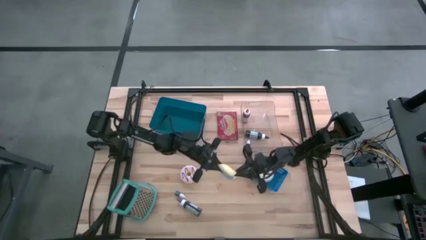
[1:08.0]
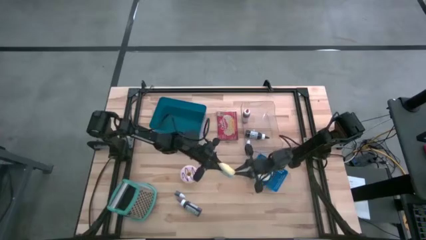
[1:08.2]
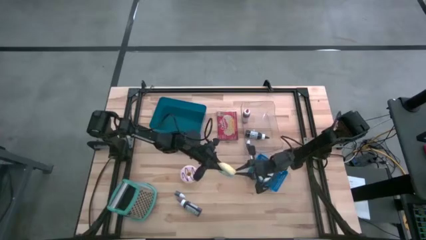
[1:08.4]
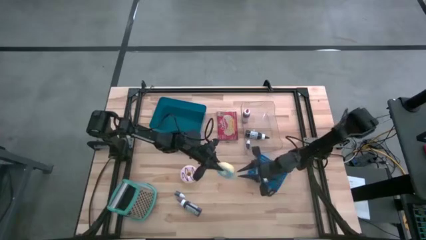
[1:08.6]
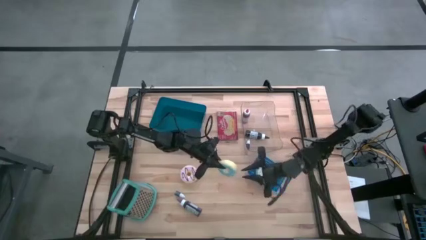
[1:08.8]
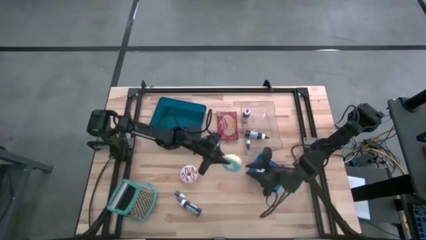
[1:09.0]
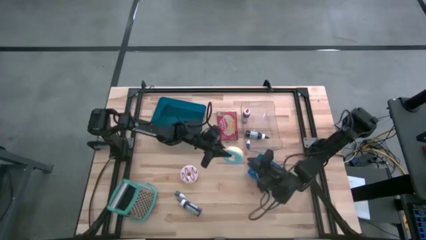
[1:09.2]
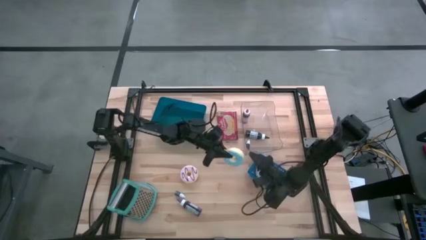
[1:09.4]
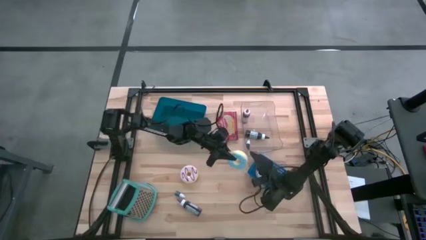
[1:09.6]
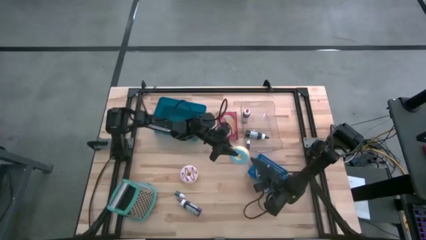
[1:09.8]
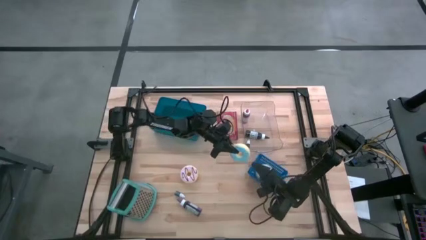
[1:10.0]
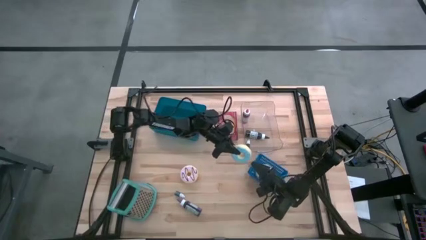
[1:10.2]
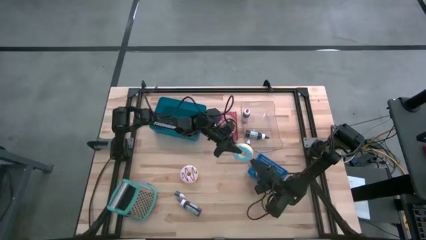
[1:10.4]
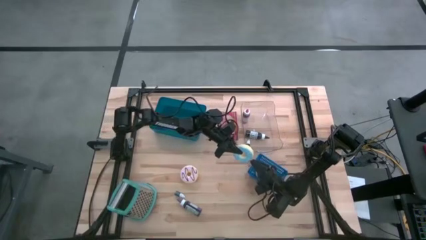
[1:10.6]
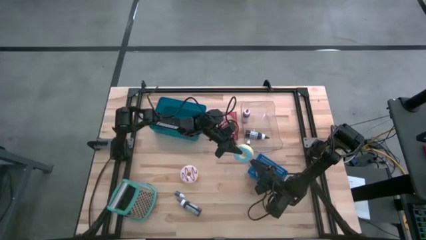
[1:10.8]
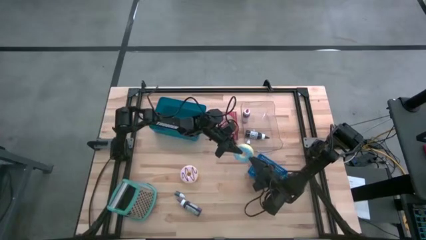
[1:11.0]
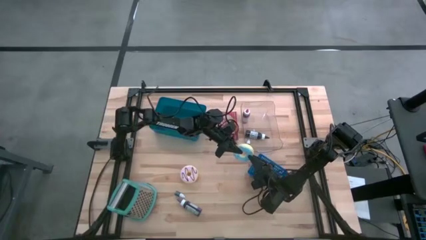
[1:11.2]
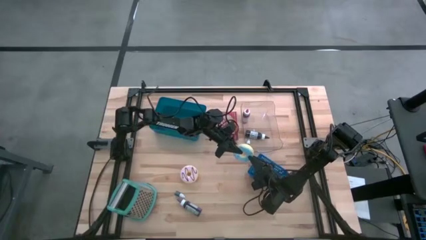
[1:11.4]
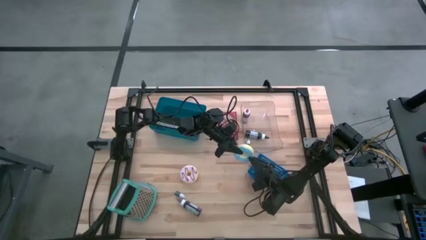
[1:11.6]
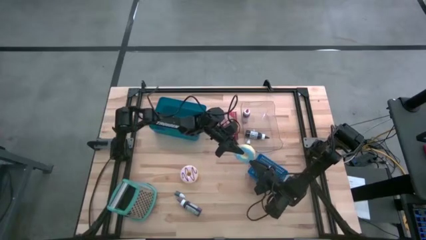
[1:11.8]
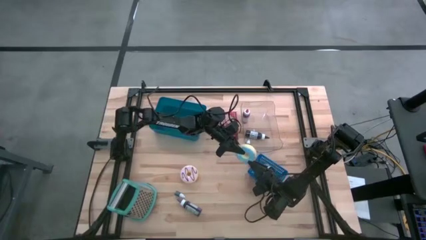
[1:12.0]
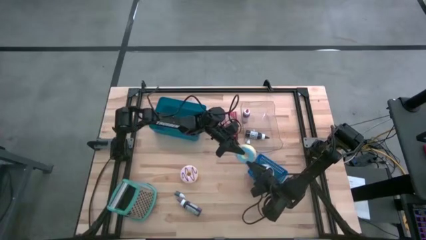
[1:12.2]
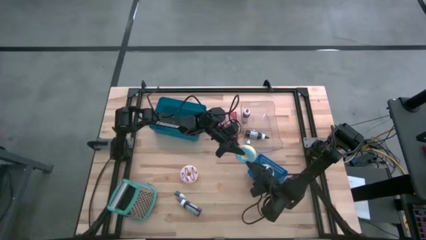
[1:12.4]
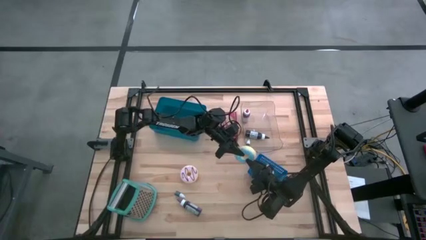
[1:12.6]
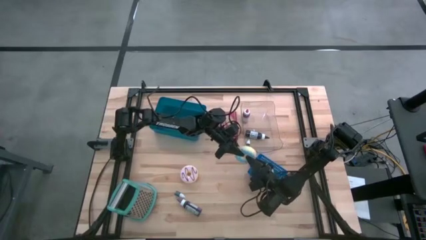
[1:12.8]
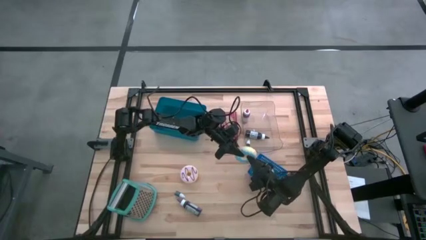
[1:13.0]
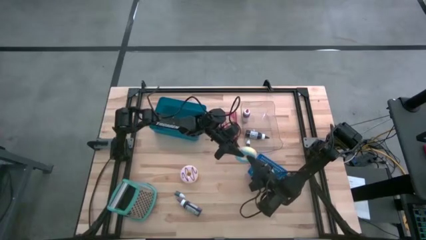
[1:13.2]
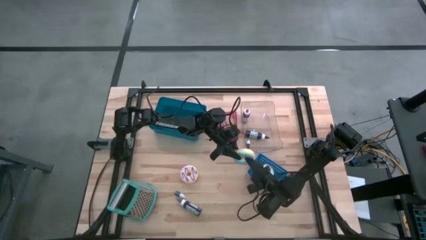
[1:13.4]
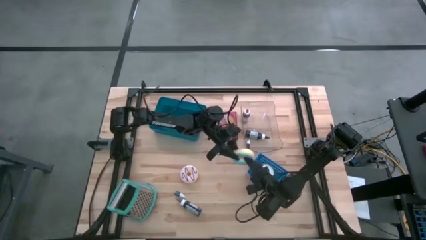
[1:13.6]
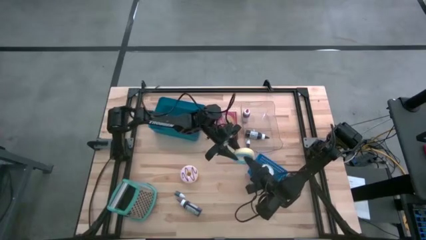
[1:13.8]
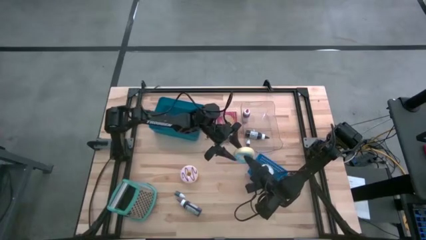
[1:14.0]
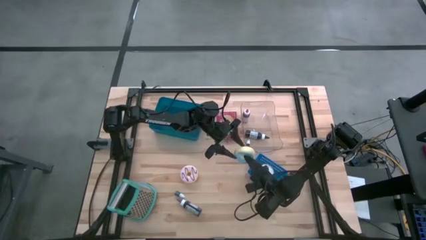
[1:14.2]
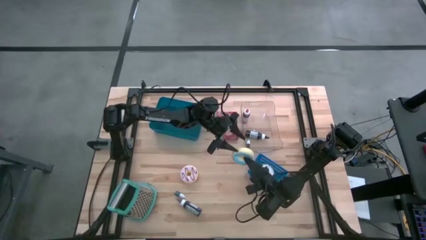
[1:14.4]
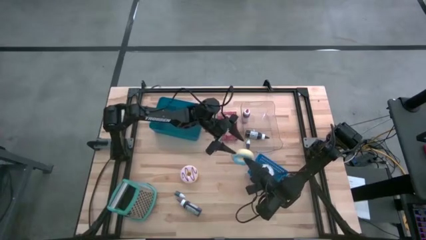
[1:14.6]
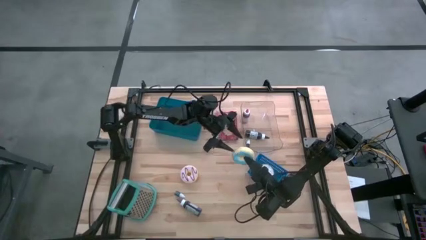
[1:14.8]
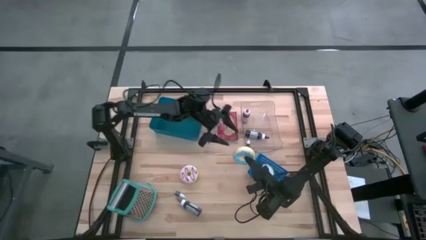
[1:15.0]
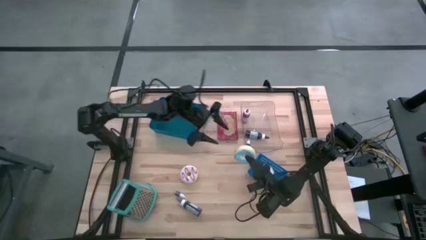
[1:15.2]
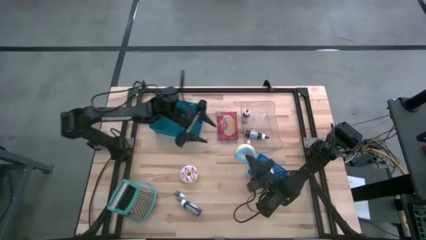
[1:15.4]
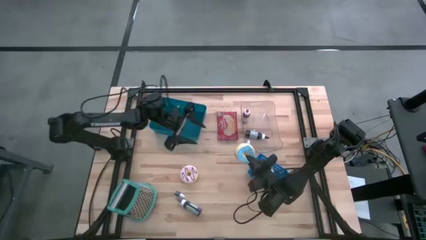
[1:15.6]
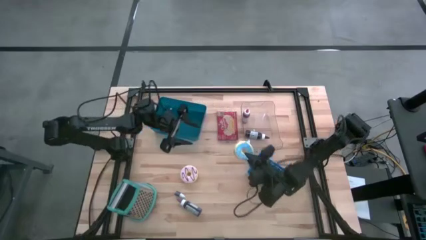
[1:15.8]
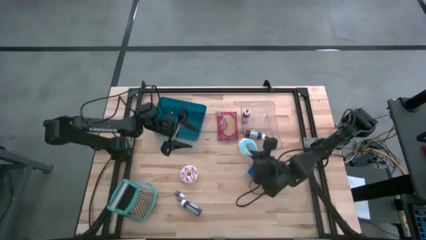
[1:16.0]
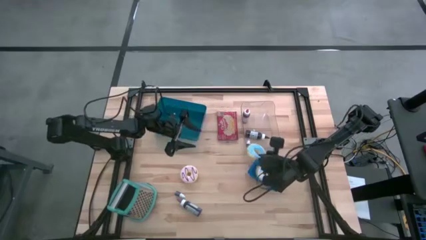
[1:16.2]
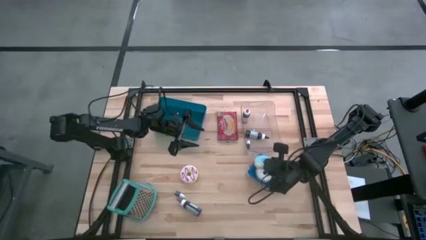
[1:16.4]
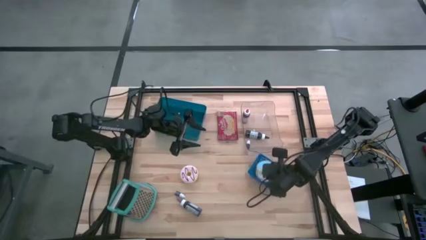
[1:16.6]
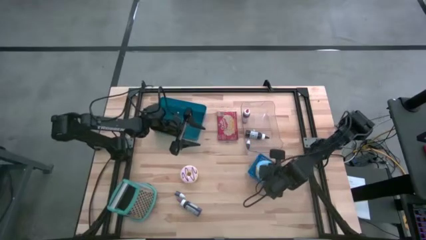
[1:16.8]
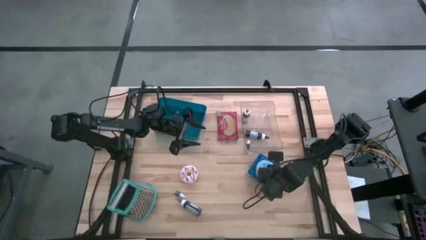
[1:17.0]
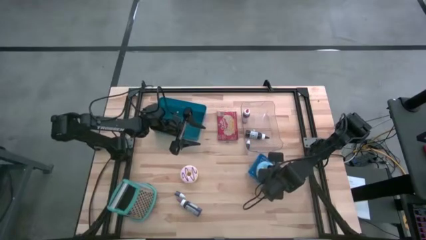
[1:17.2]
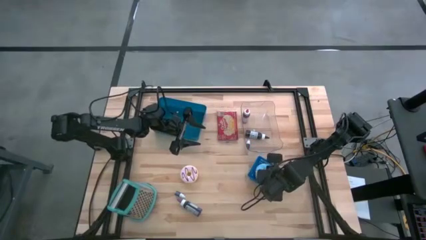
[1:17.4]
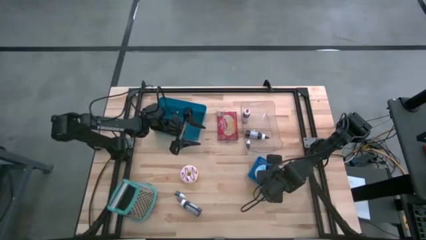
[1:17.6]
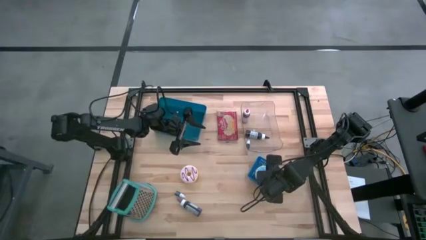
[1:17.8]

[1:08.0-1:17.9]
Task: Pick & Place Food Item
Put the orange doughnut into the blue bin

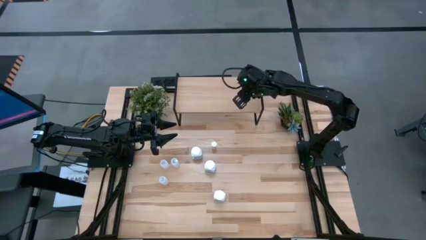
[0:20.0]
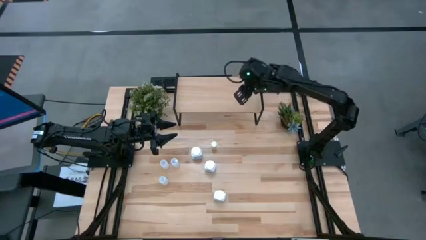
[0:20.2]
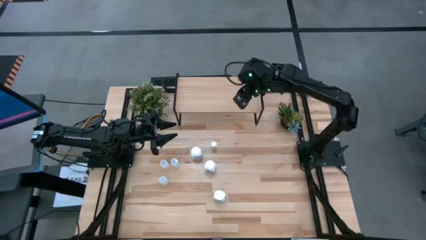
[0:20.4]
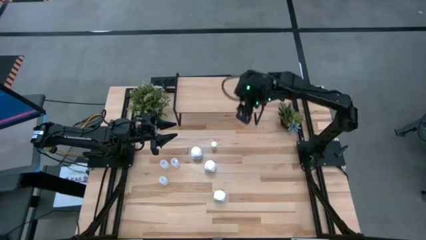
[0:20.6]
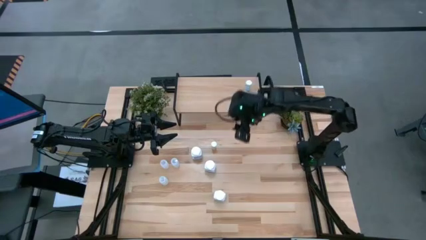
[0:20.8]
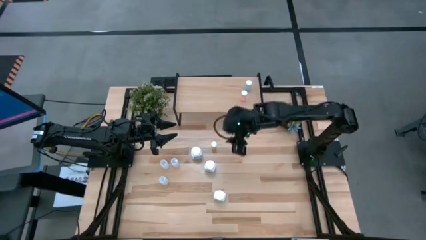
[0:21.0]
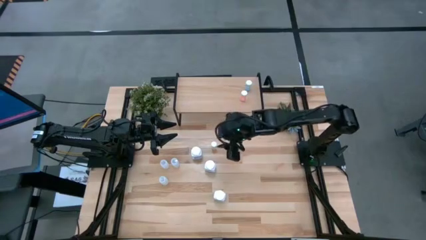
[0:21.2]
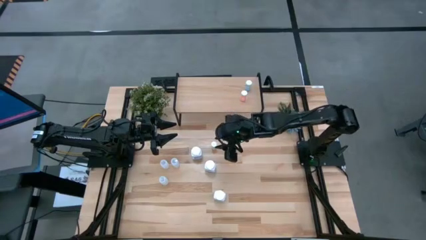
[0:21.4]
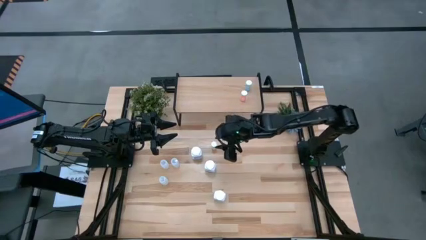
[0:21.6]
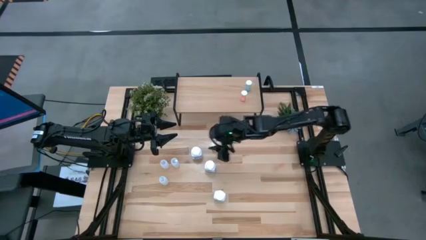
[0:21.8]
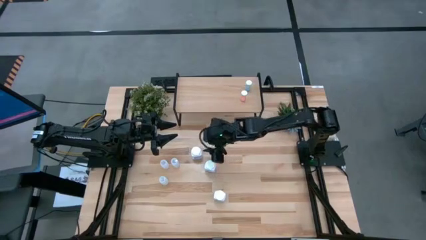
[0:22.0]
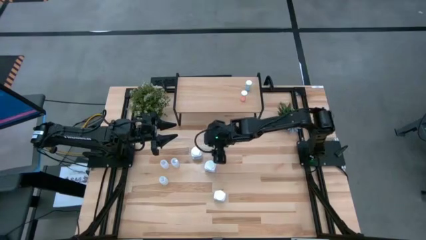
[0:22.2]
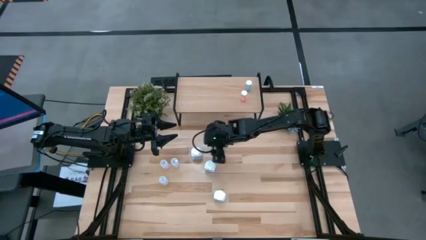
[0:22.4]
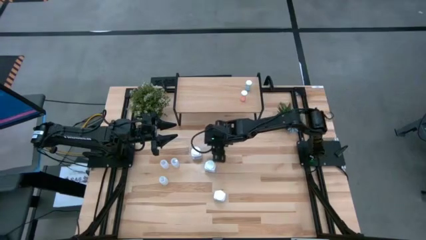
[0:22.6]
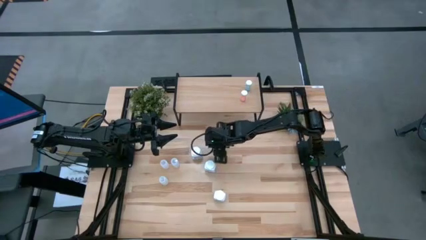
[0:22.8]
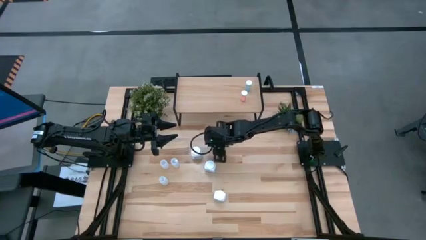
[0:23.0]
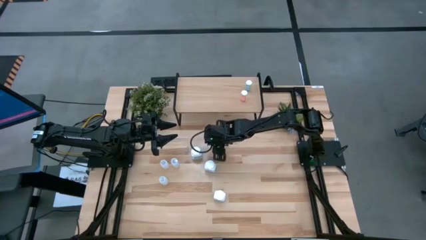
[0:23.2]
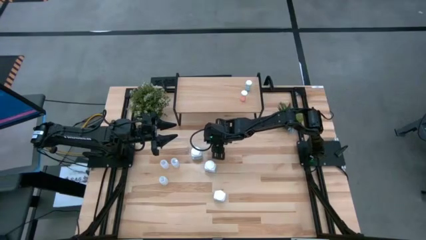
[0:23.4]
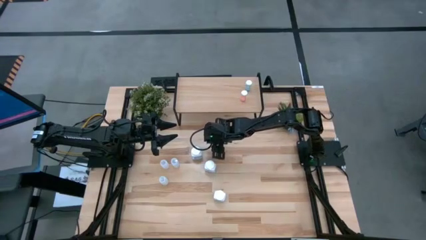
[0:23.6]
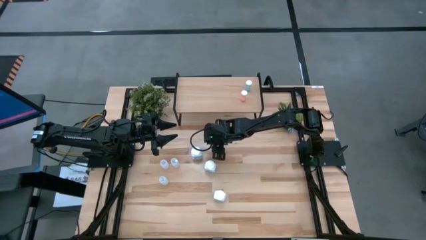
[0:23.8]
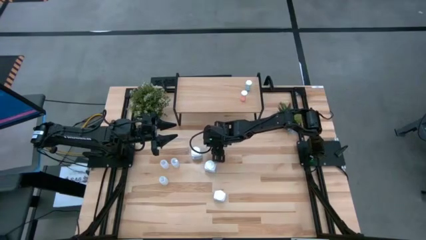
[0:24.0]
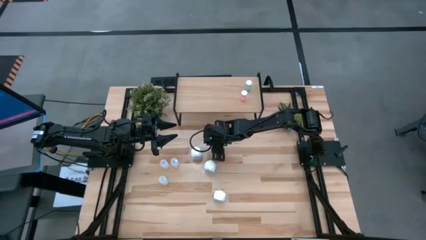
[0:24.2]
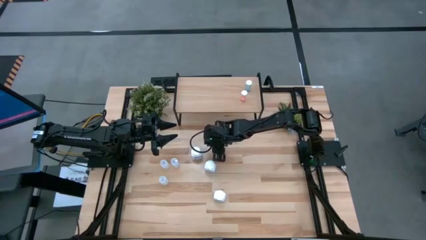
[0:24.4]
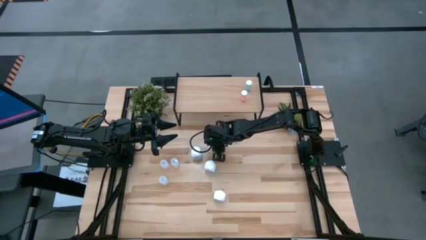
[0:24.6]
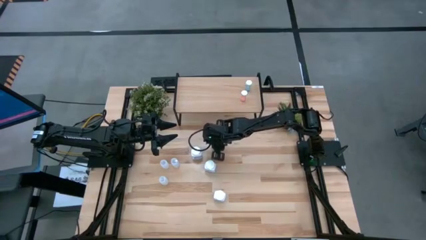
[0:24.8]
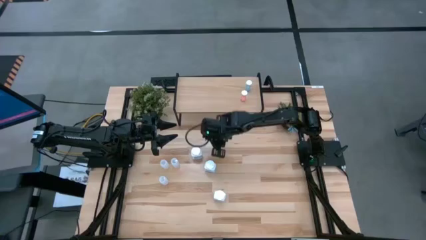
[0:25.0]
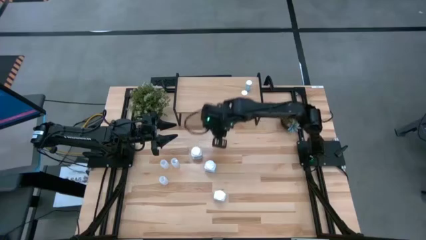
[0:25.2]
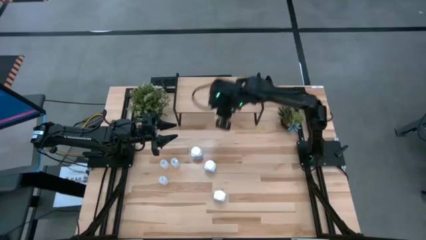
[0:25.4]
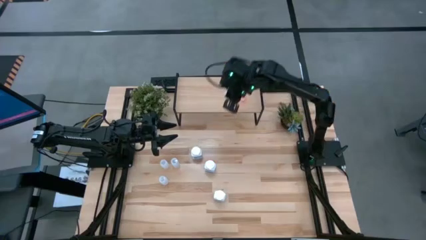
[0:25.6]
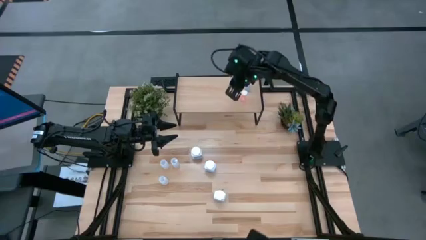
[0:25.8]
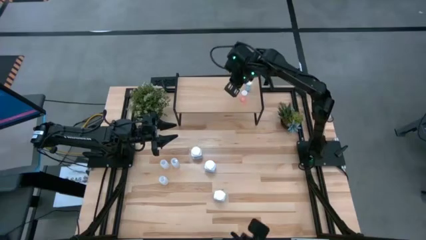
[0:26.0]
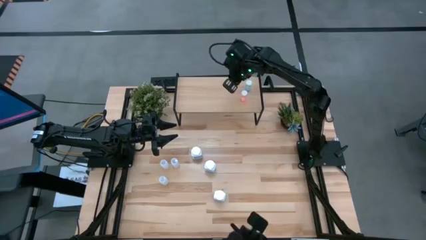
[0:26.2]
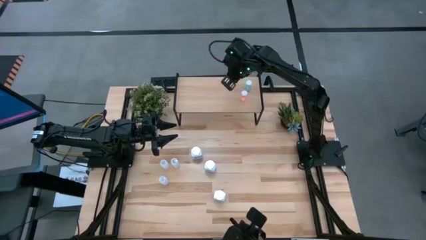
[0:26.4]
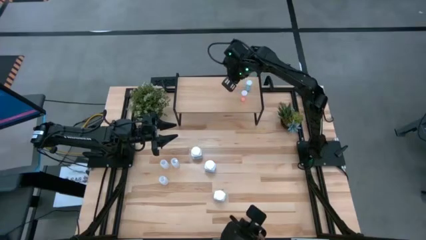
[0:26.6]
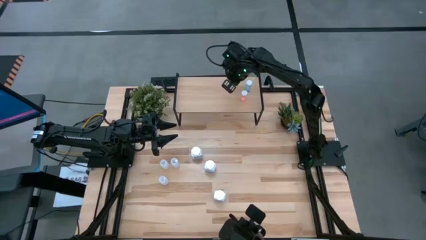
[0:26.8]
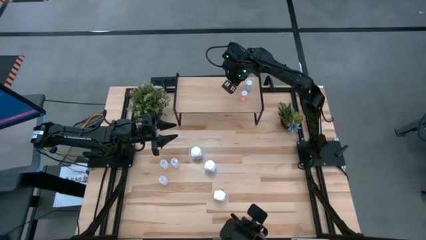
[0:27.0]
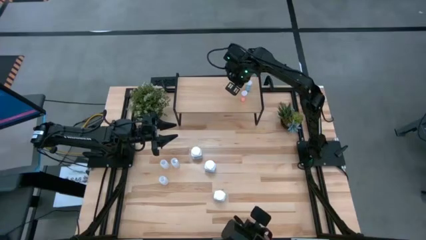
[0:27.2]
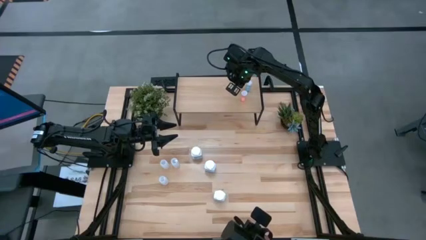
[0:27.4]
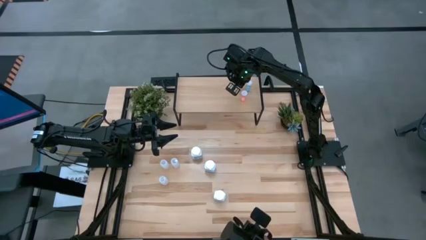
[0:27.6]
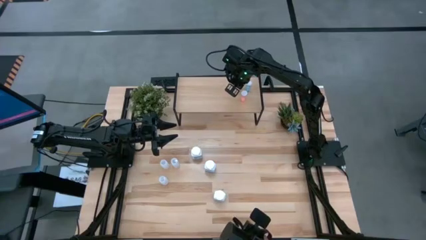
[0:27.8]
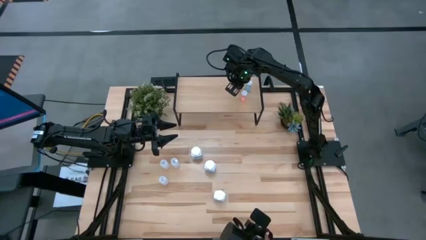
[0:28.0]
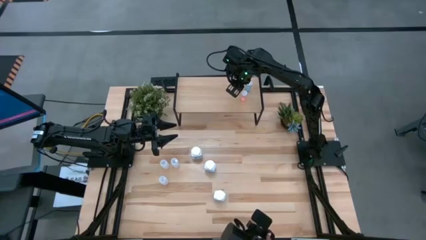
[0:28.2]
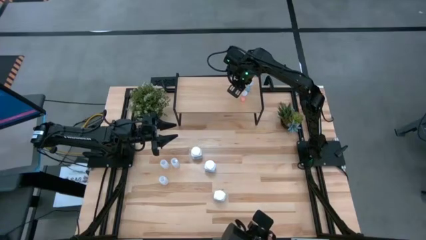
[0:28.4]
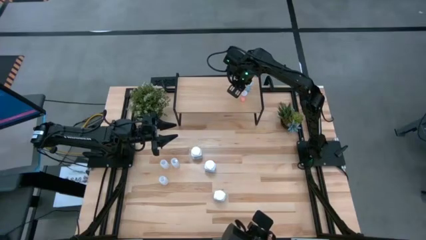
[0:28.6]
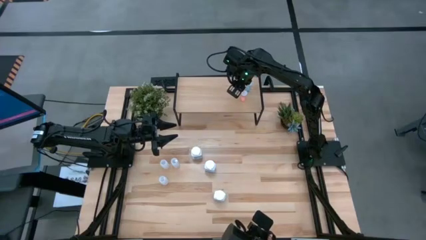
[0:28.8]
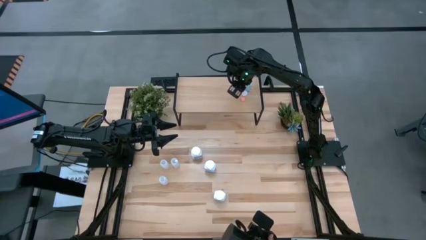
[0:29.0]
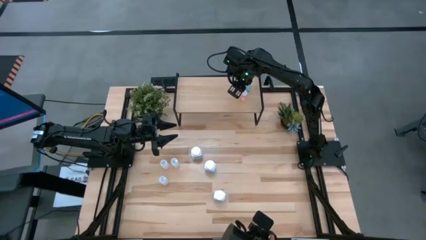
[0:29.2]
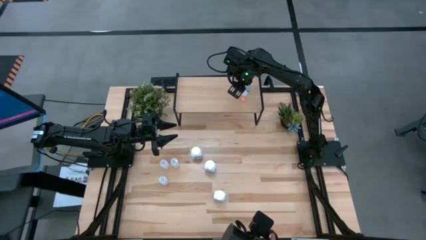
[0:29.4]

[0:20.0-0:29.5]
Task: Pick and place medicine bottles onto shelf by color
Put the yellow pill bottle on the shelf
